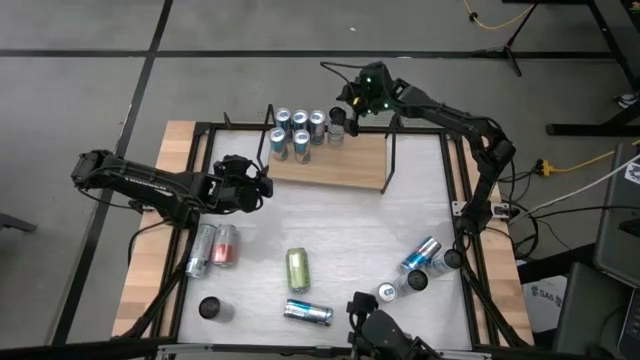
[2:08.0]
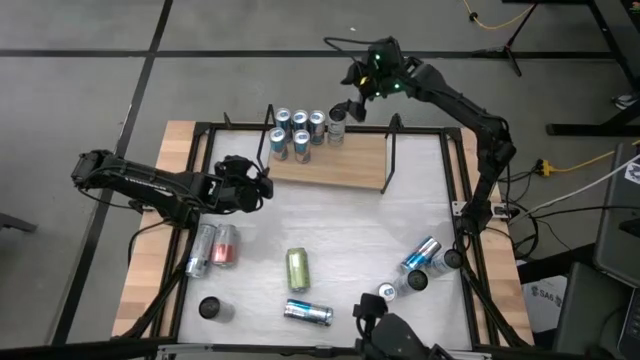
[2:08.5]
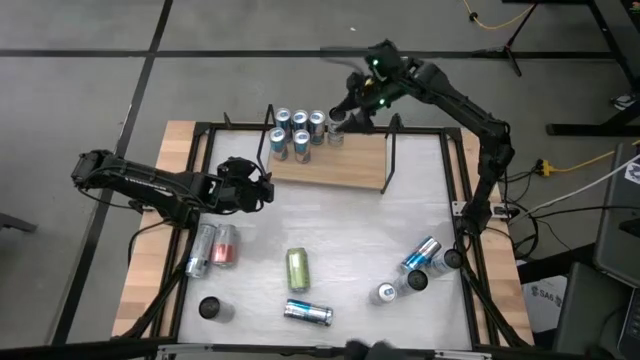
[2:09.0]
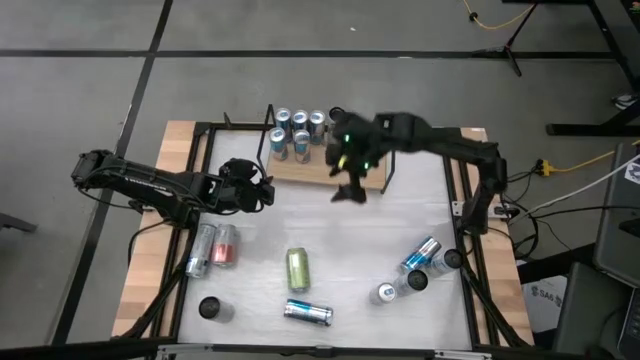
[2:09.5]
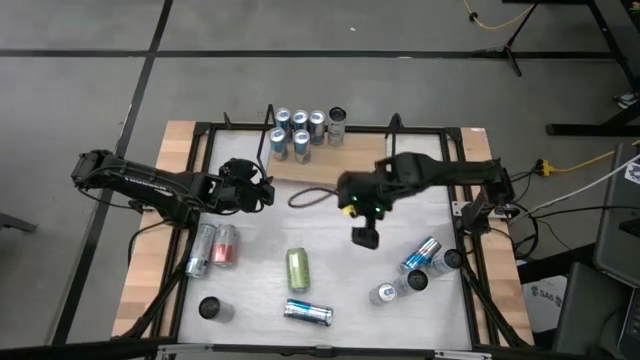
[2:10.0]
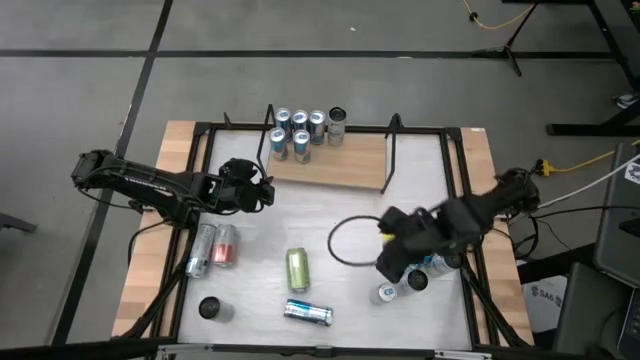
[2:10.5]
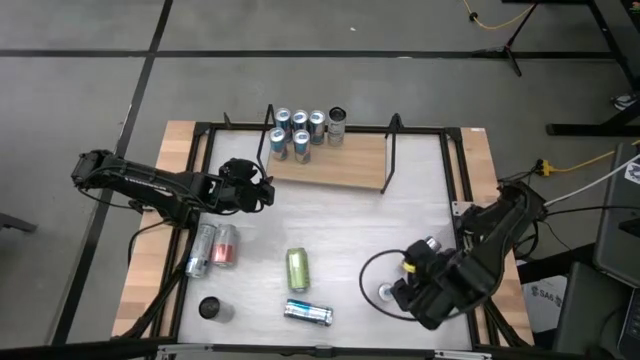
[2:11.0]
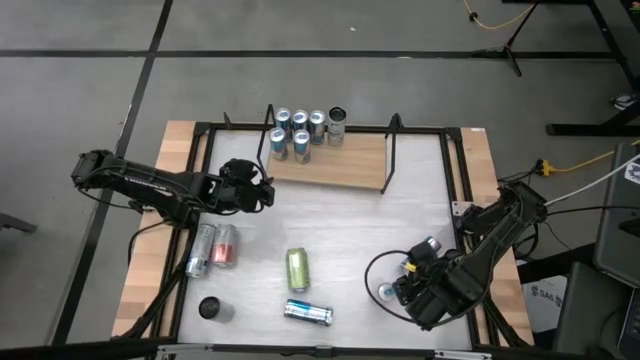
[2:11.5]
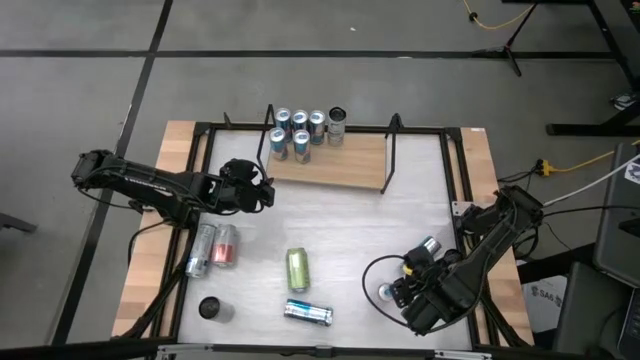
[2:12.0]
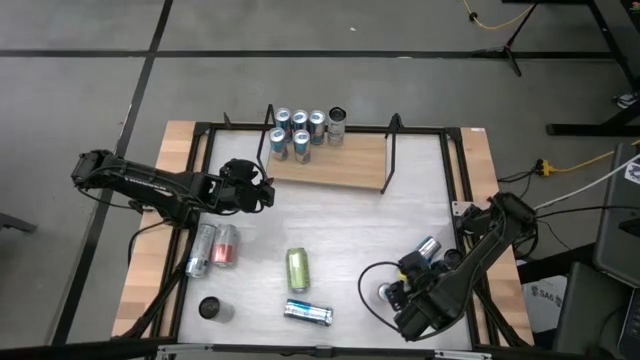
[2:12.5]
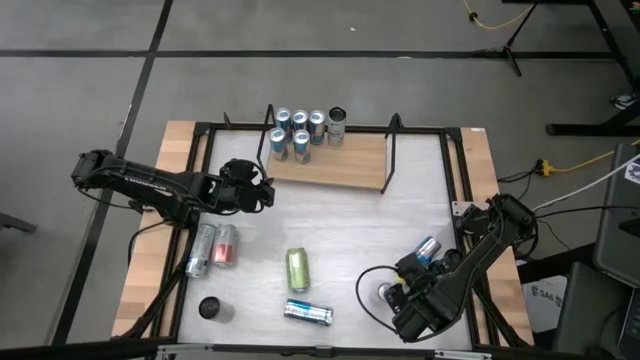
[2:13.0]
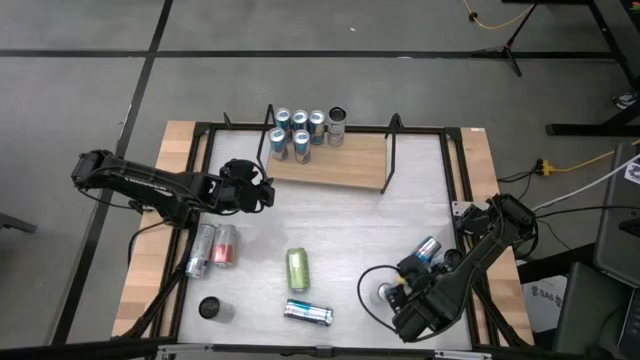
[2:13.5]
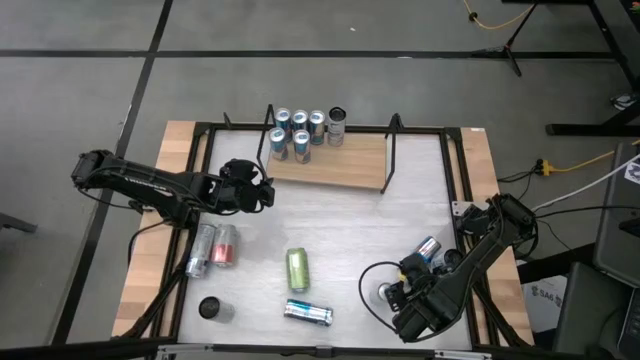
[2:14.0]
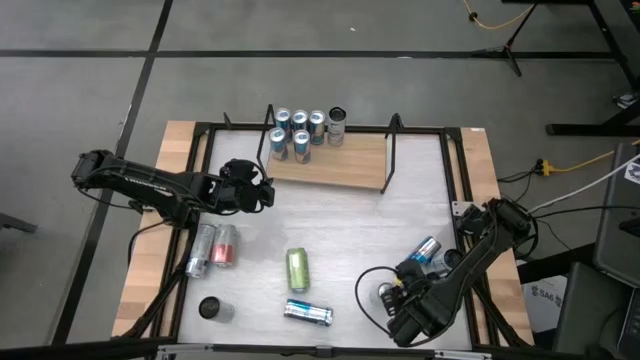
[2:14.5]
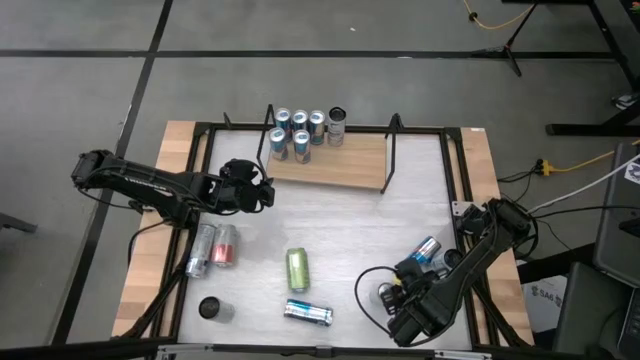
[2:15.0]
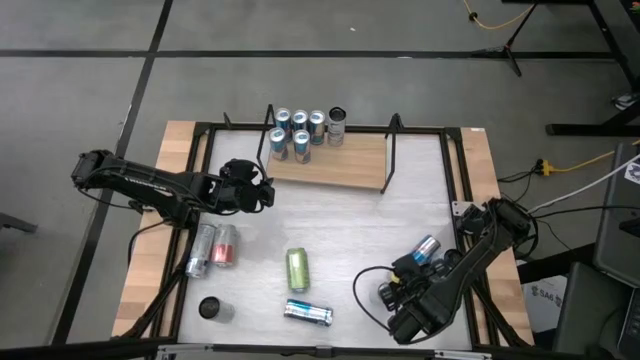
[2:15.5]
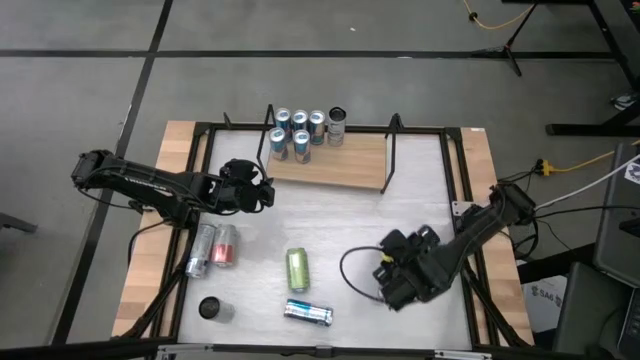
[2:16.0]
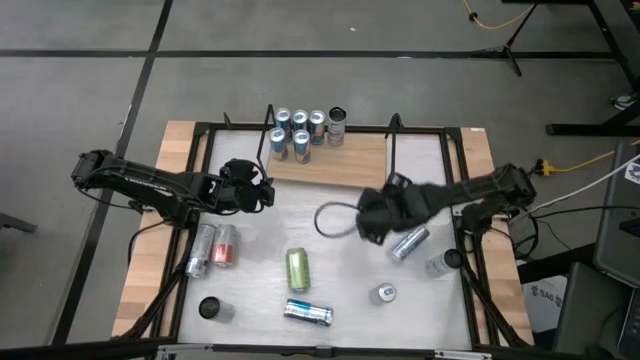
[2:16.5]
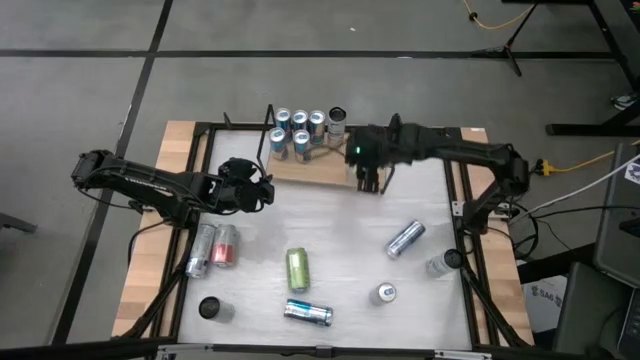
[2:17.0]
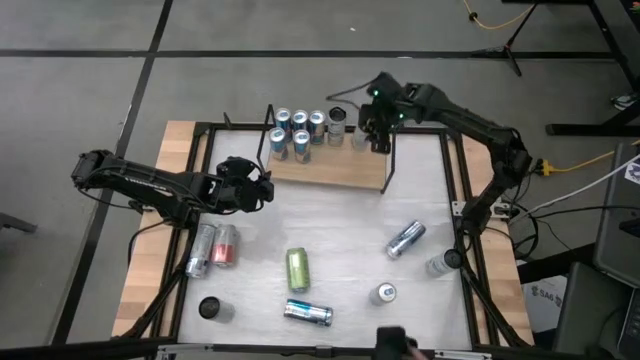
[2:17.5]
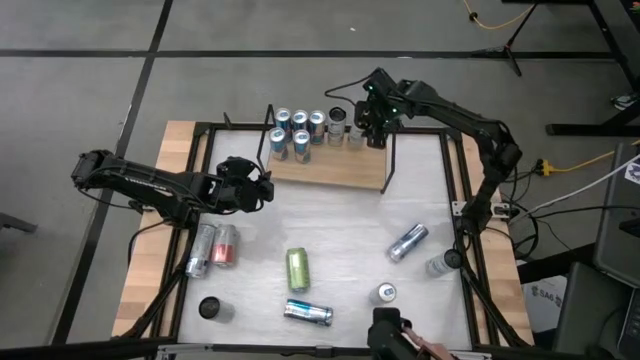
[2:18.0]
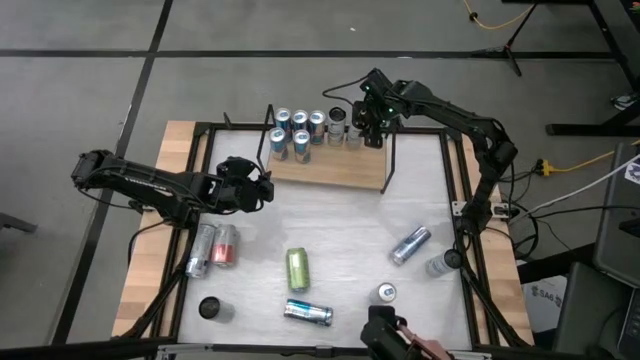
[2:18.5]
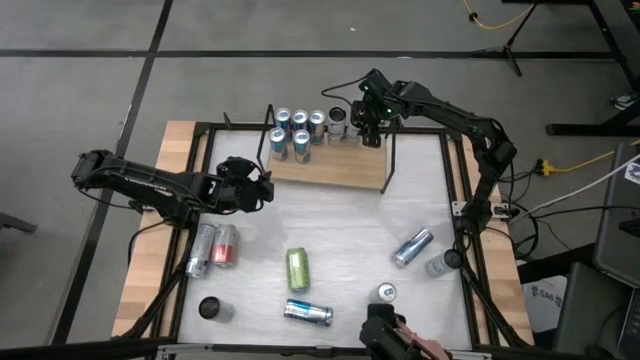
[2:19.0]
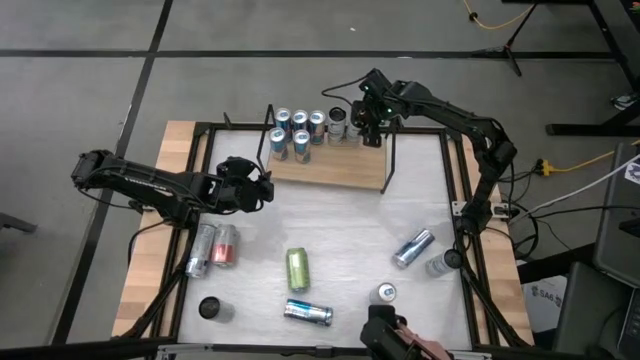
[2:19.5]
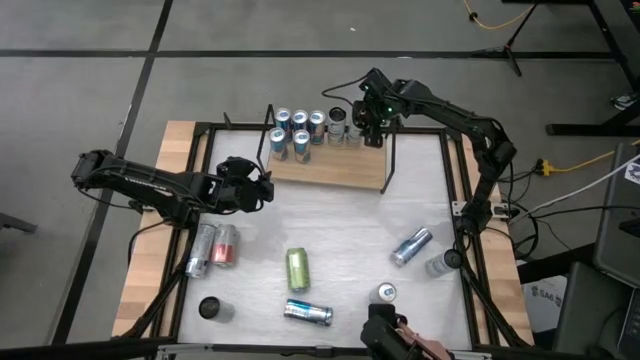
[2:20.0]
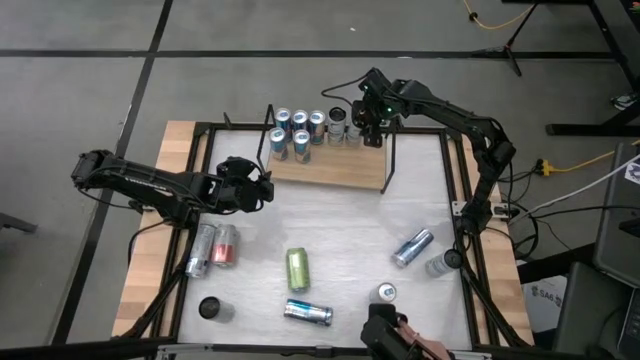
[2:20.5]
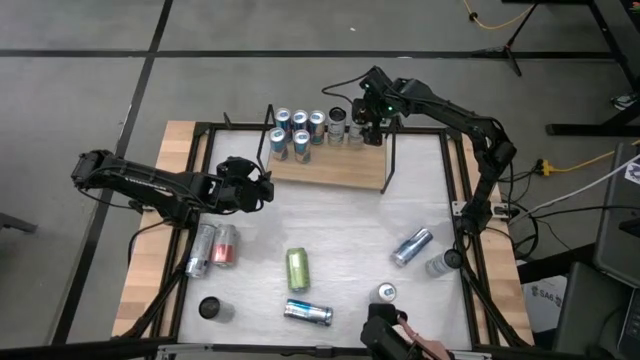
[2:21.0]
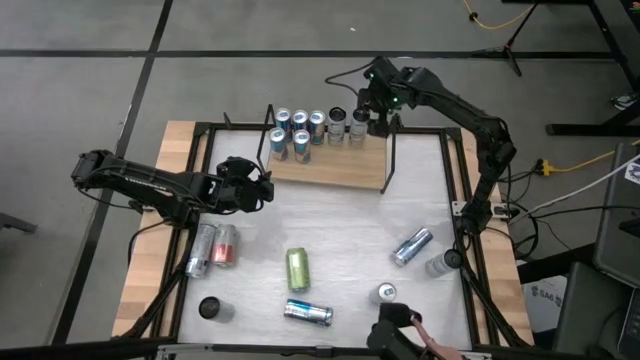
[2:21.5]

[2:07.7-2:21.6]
Task: Place canned beverage on shelf
Put the white blue soda can on the shelf

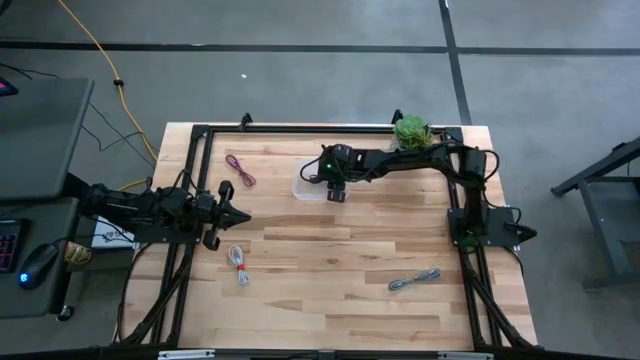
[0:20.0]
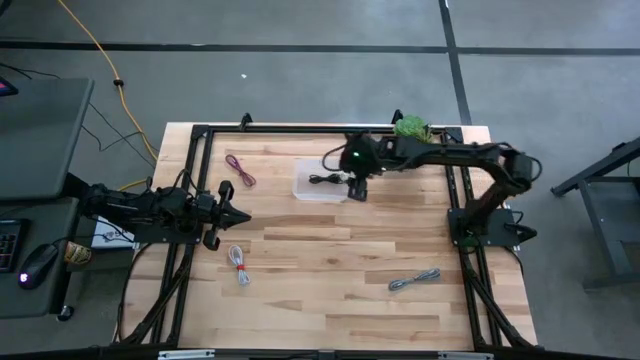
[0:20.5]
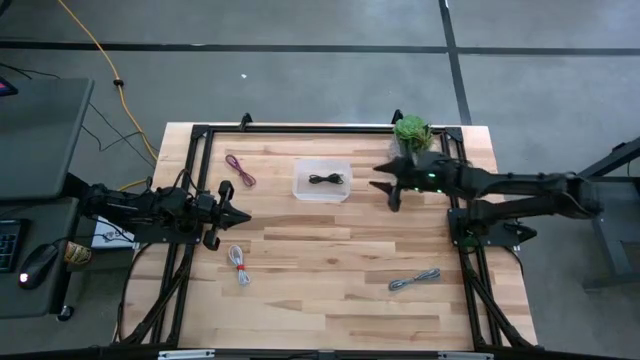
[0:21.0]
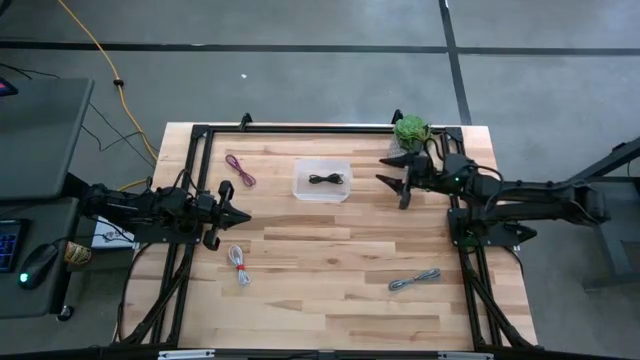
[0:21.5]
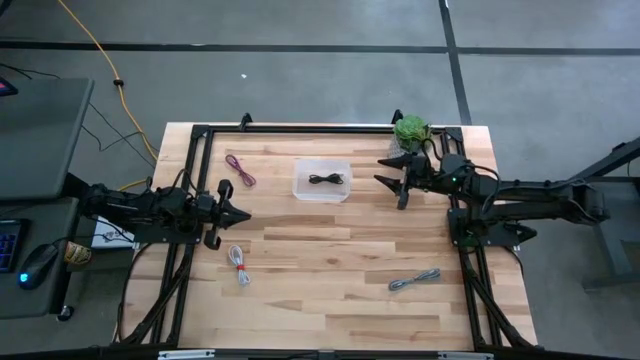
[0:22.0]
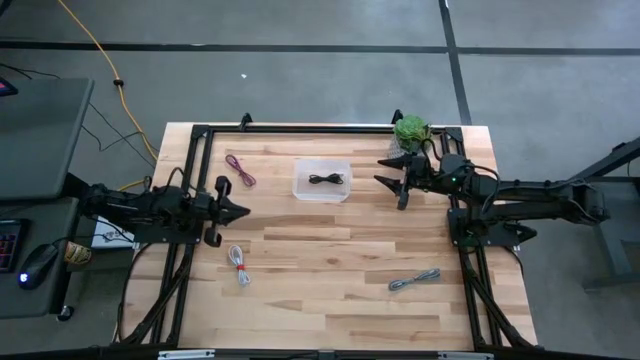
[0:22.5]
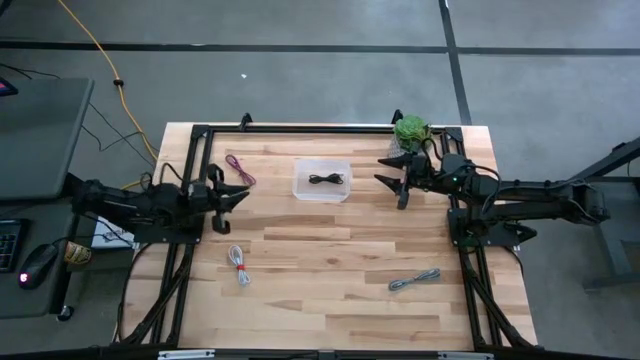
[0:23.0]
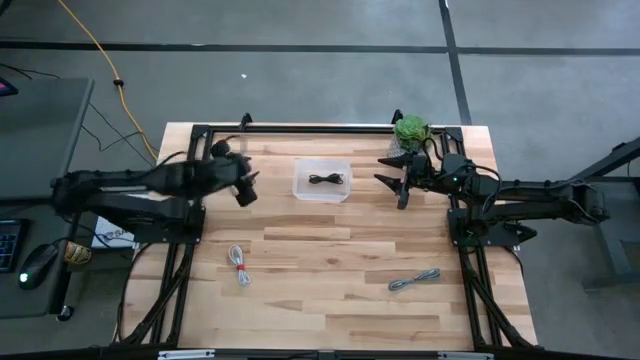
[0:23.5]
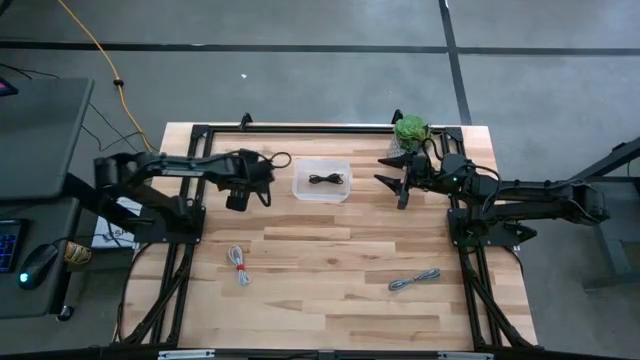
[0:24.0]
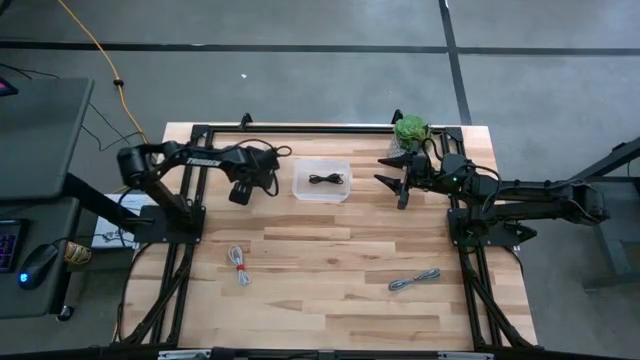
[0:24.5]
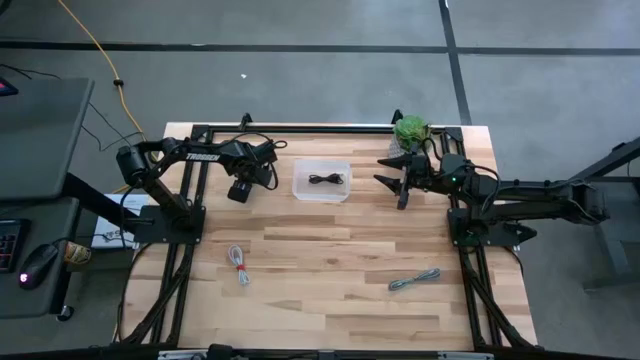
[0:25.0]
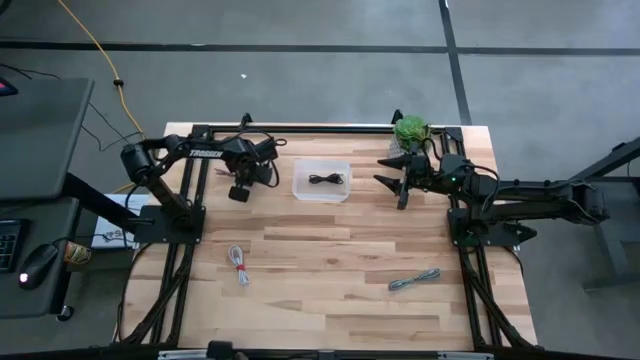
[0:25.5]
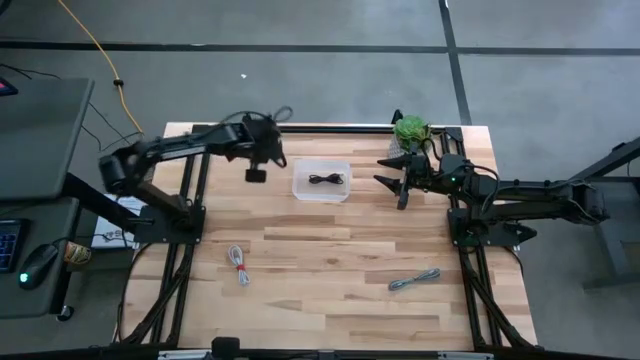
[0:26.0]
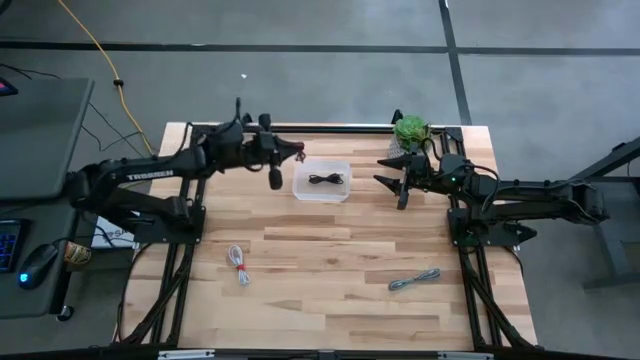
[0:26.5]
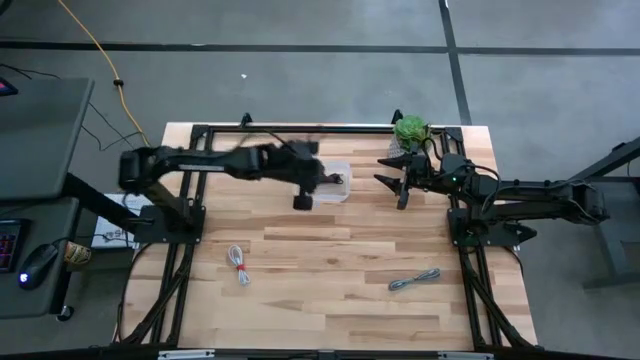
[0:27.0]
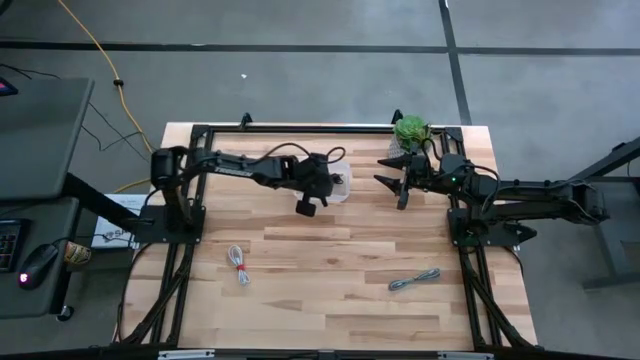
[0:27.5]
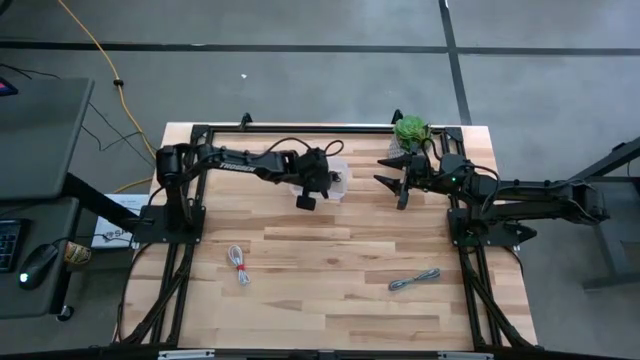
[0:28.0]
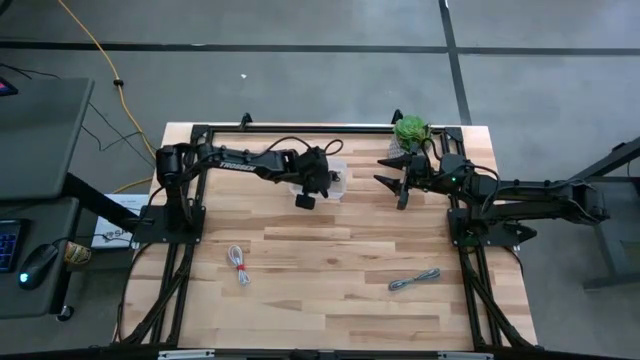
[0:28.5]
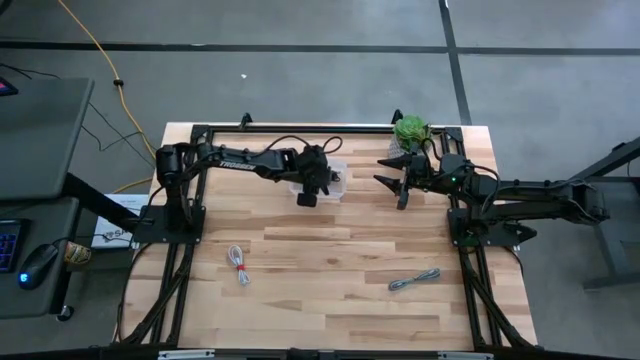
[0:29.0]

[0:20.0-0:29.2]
Task: Pick and place USB-C Cables
Put the pink charger cable into the transparent bin
